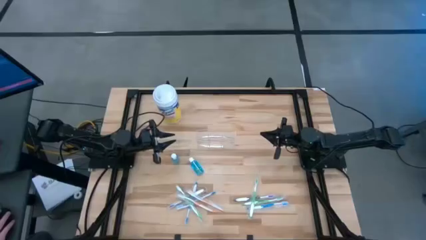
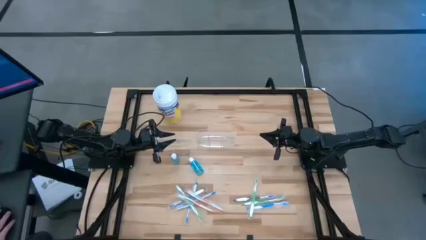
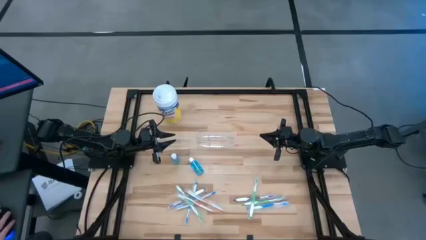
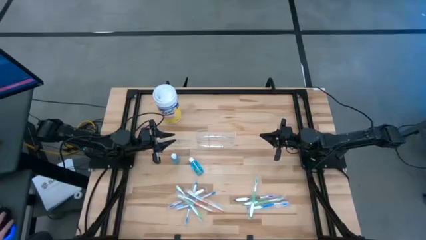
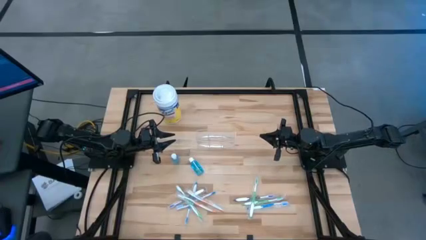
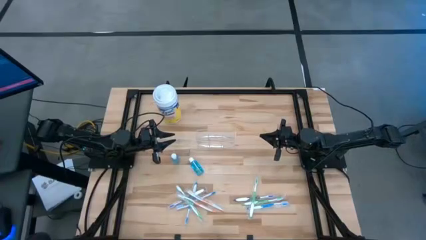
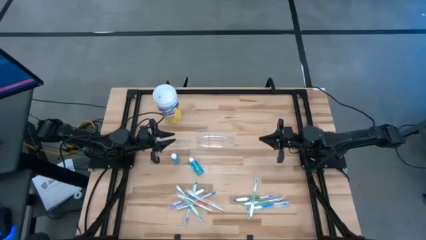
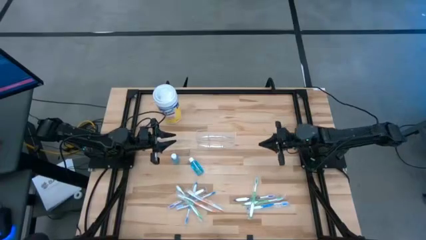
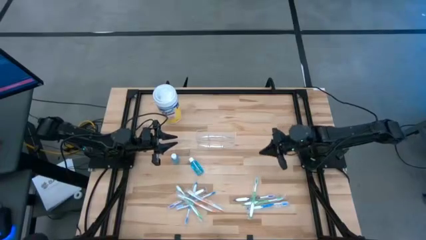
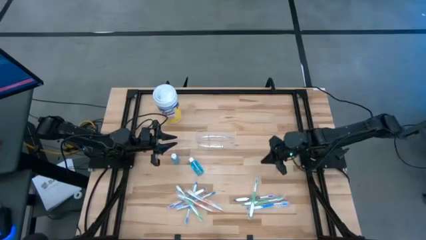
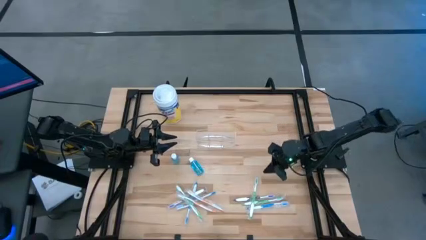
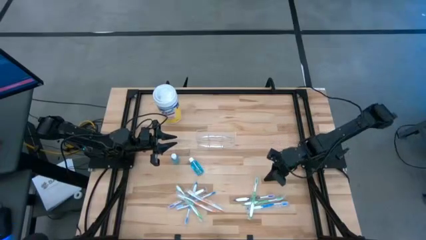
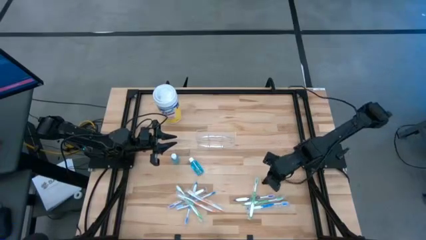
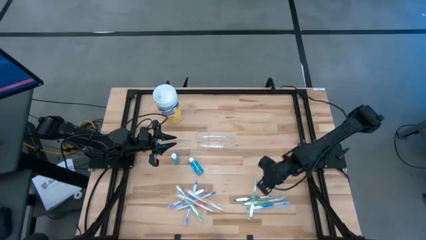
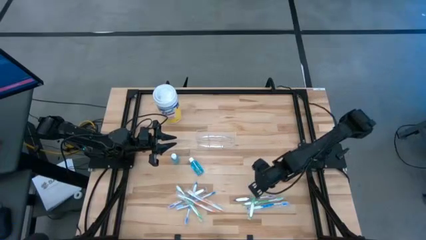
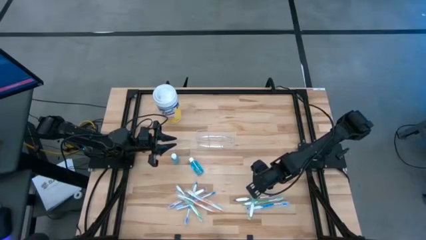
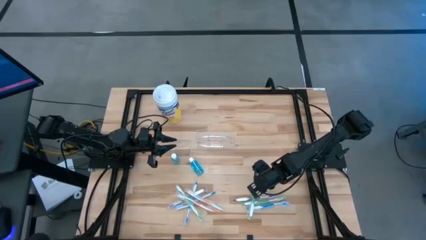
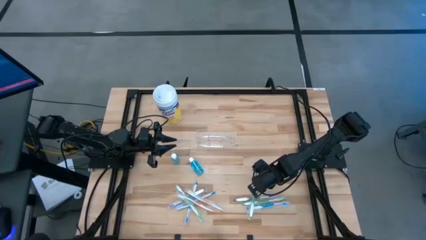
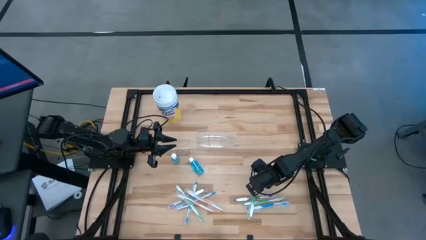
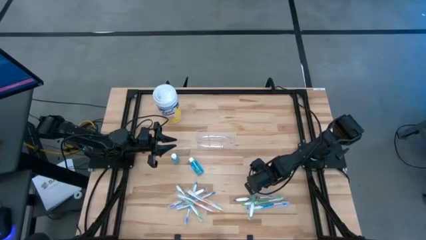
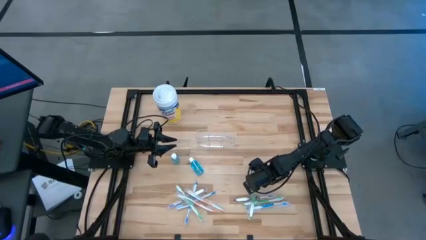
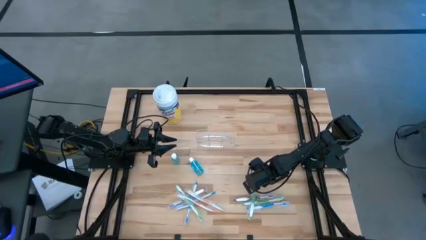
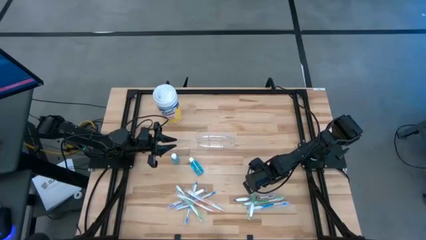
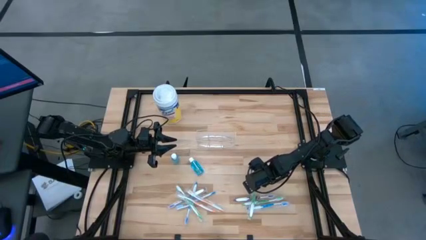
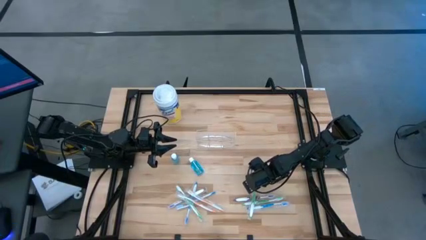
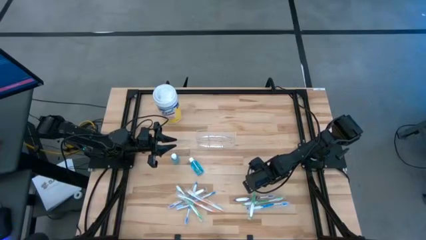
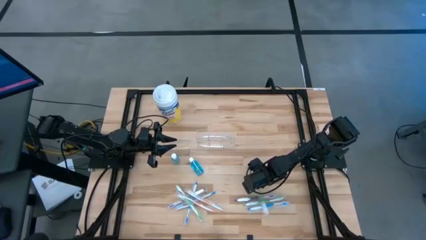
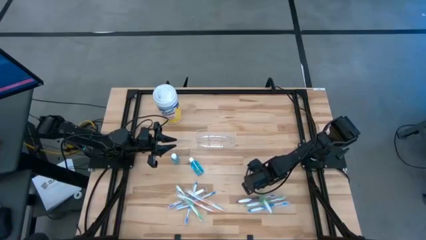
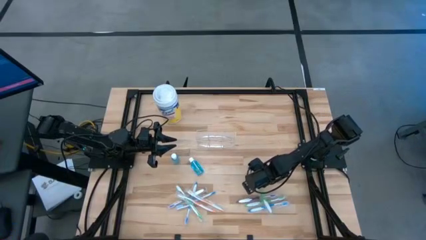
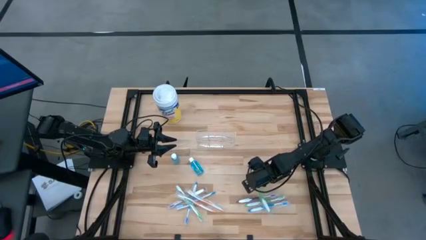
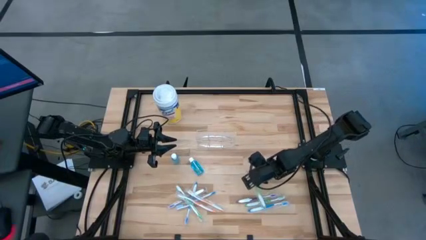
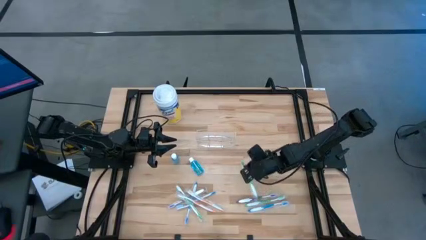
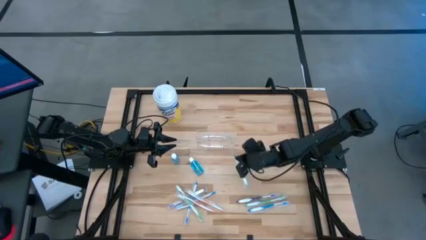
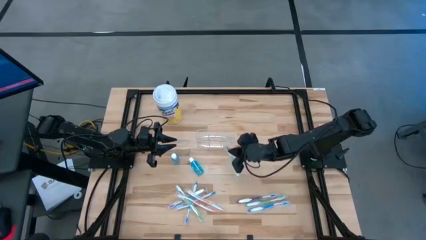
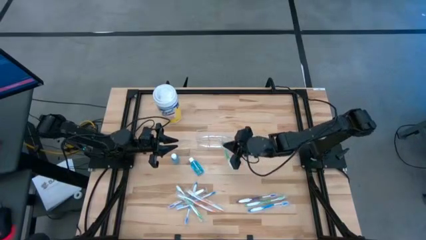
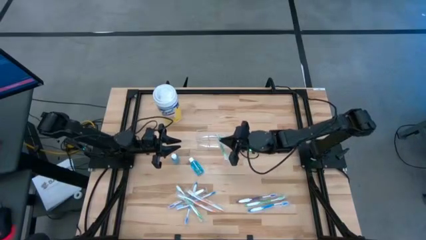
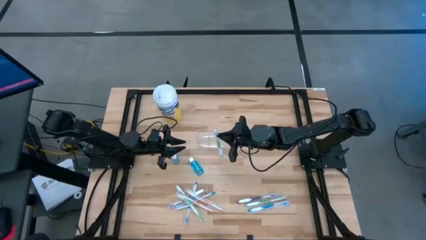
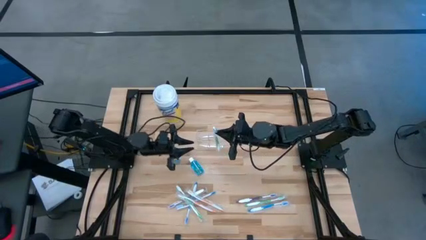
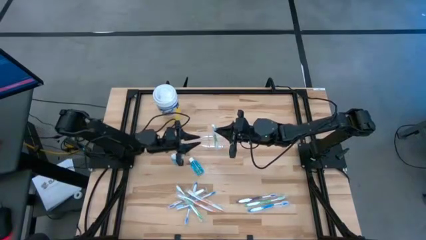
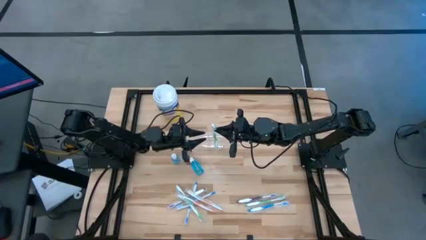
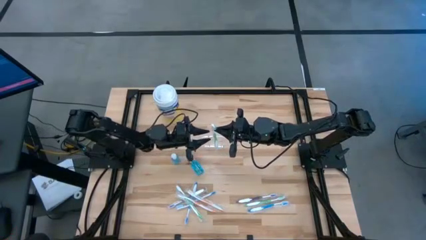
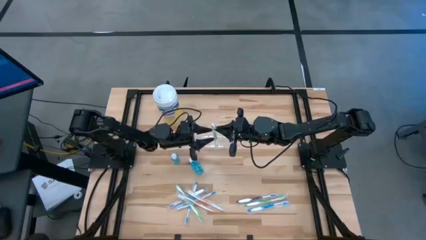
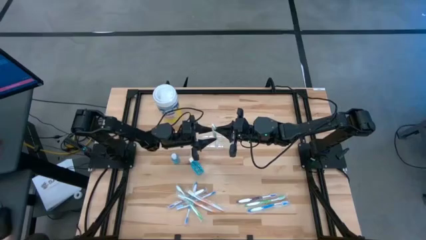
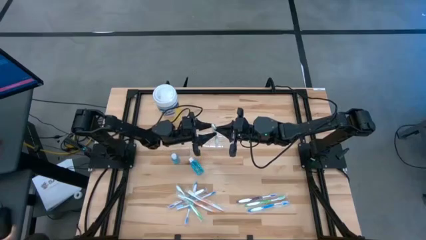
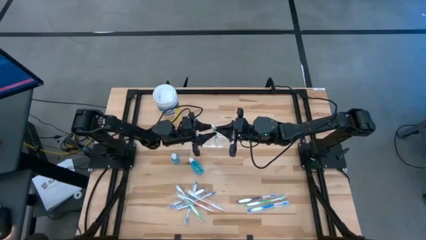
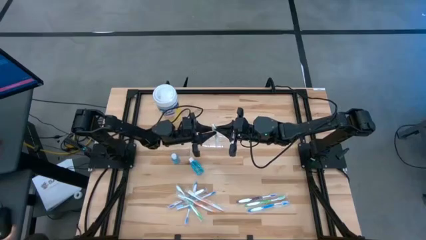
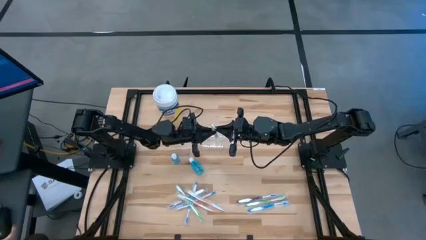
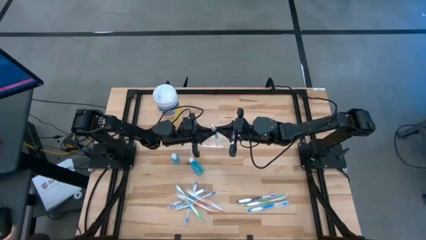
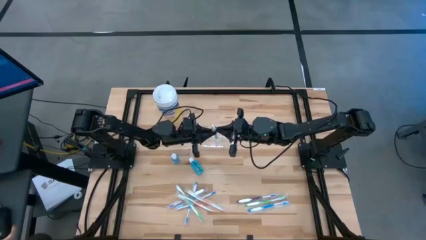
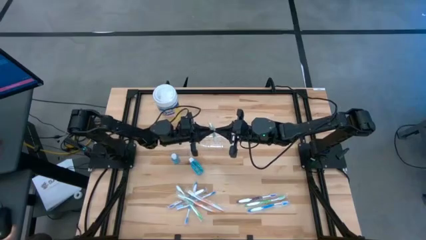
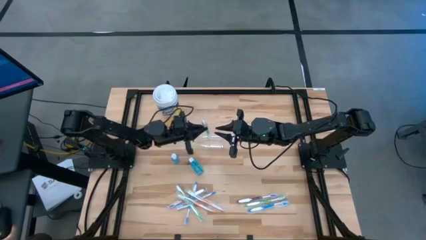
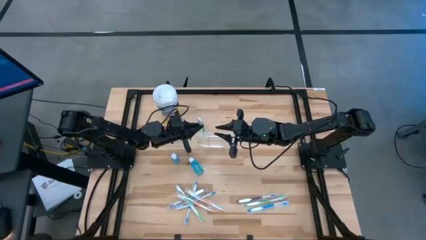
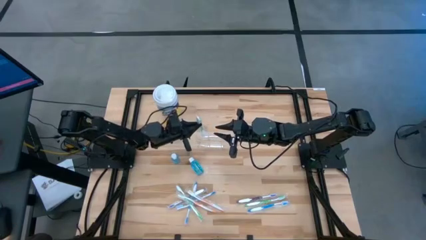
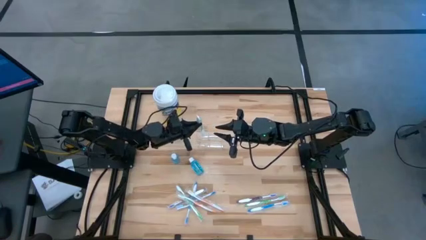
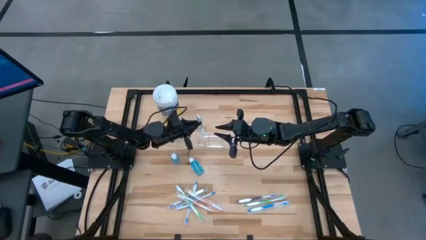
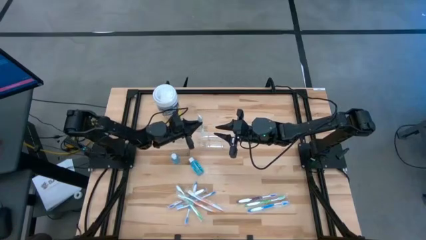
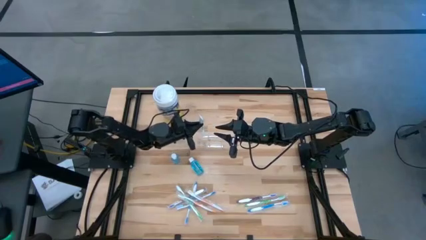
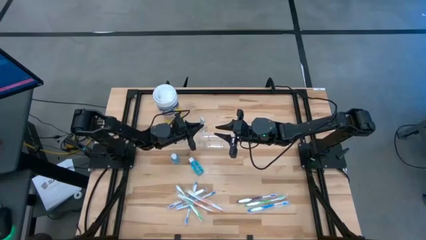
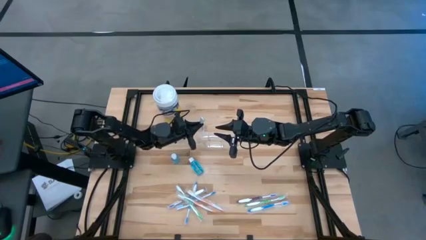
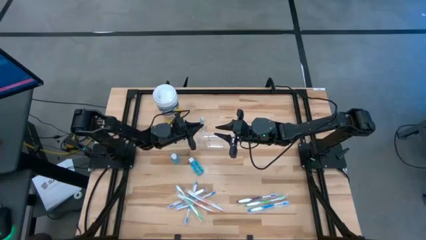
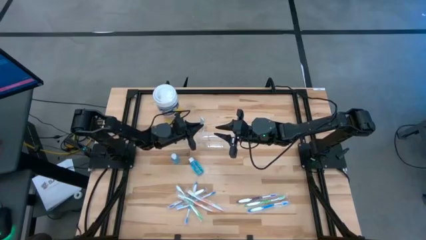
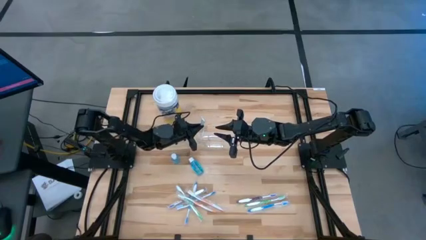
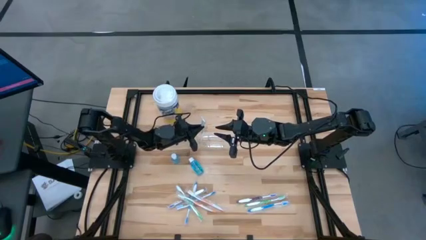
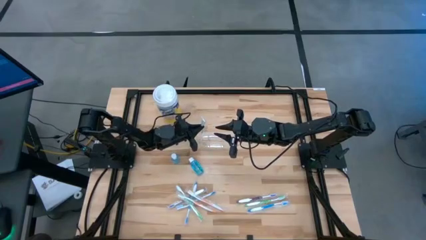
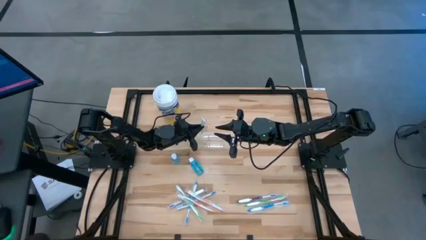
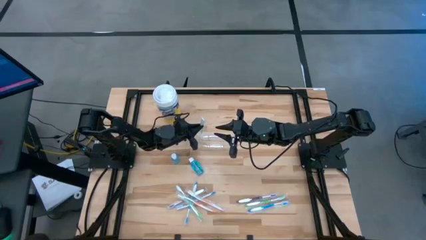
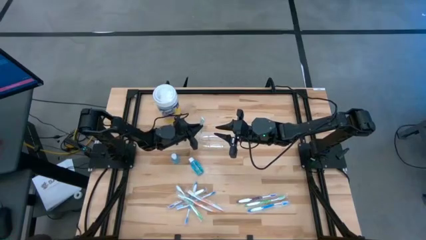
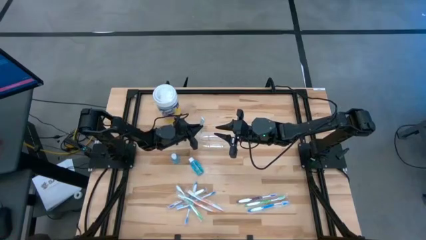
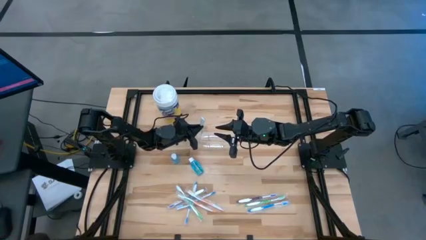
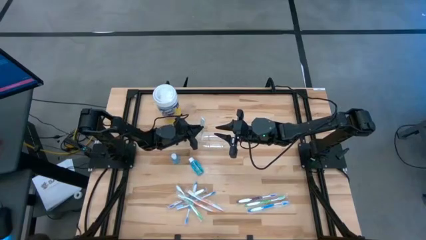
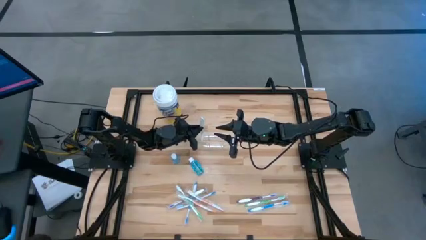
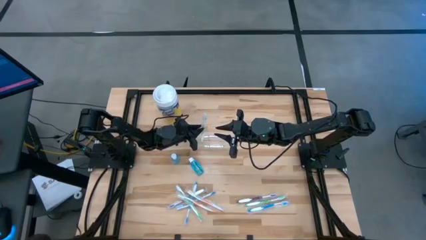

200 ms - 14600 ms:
Task: Pick & Place toothbrushing station
Put the top right green toothbrush into the transparent organizer
